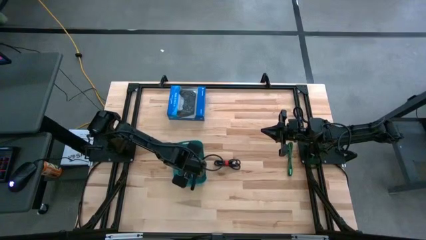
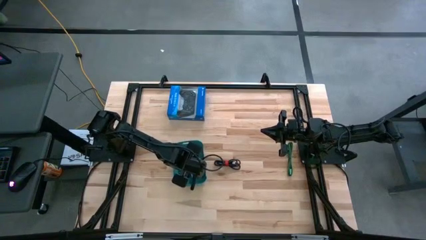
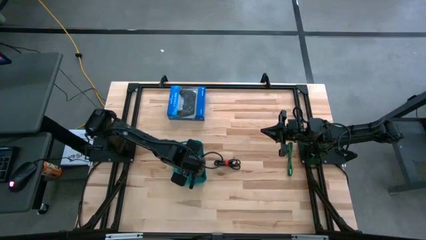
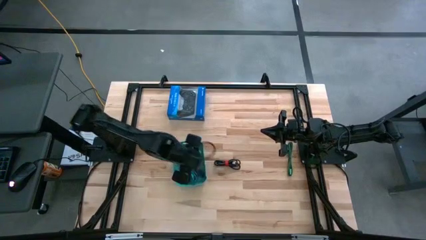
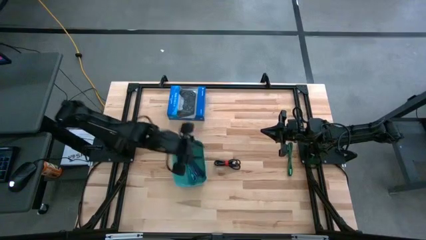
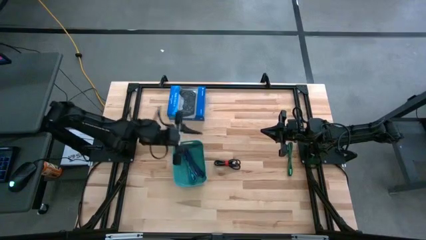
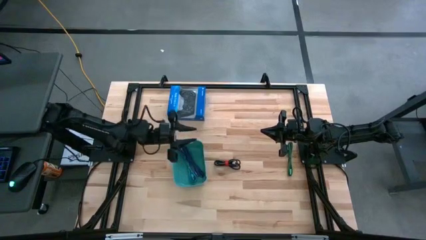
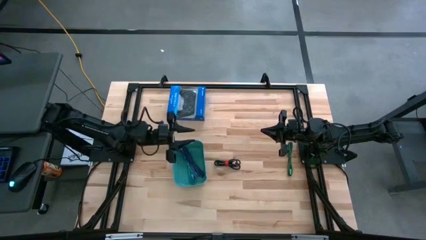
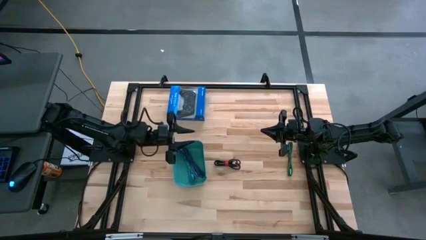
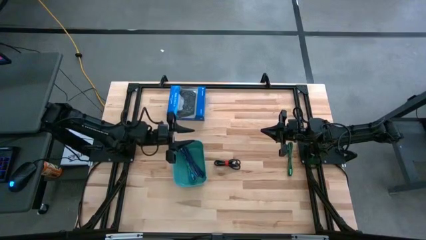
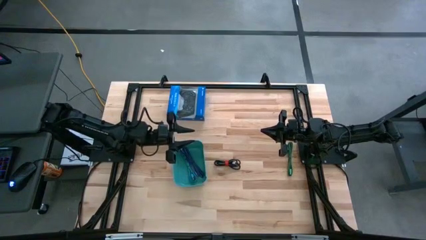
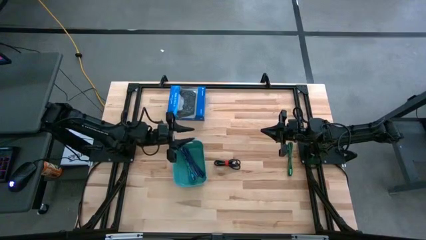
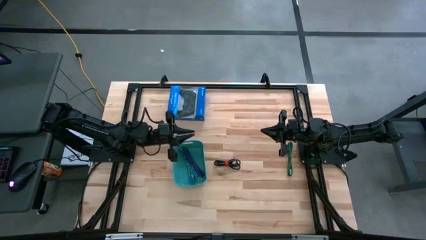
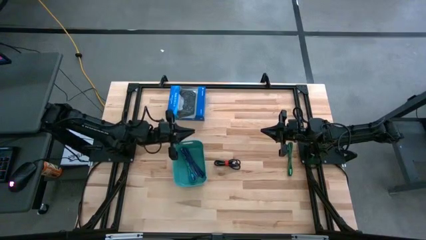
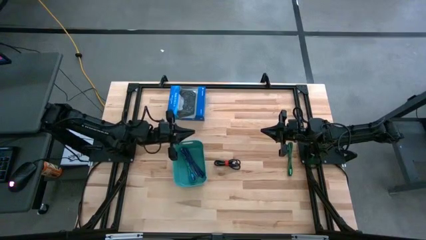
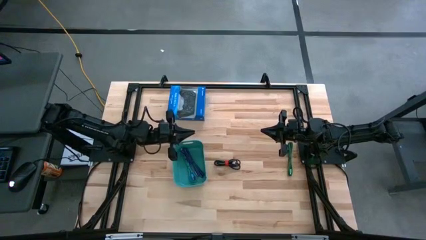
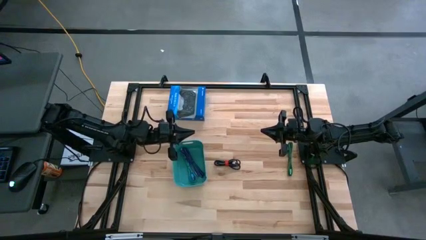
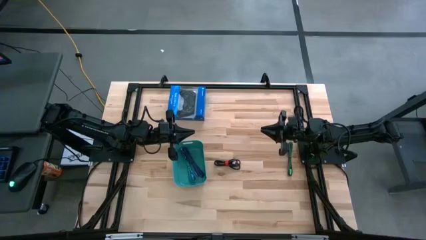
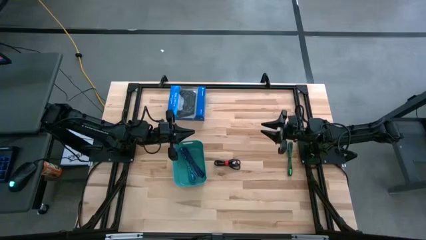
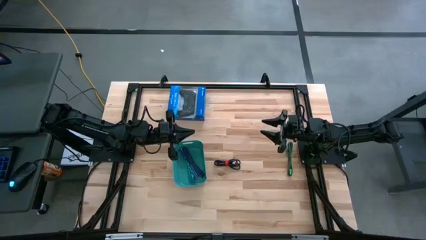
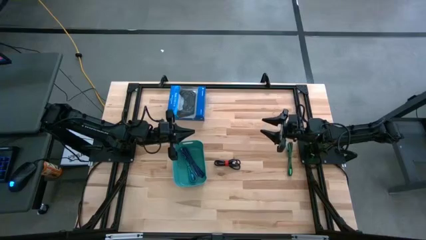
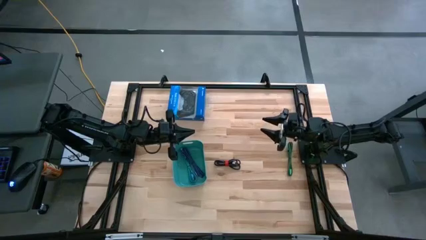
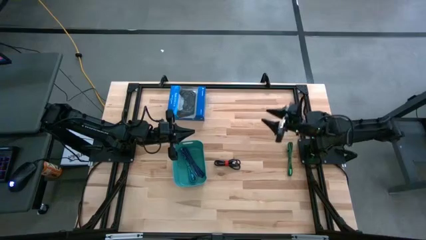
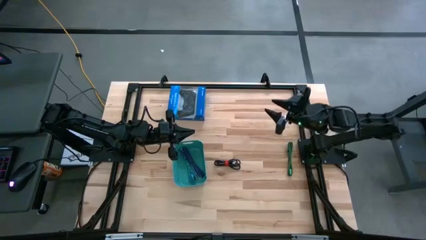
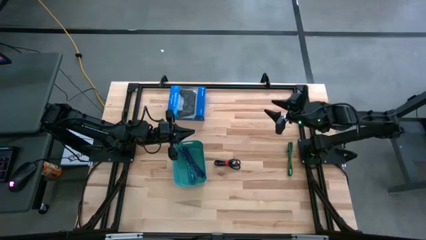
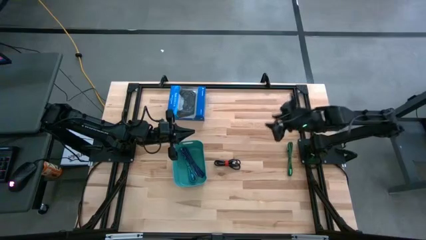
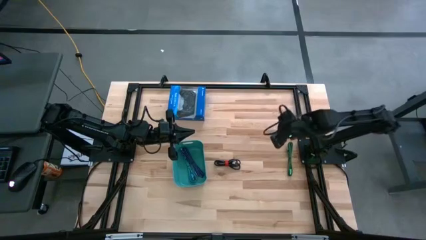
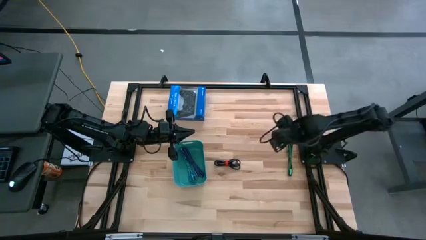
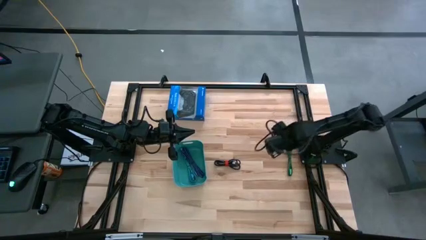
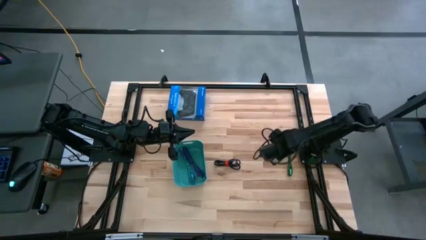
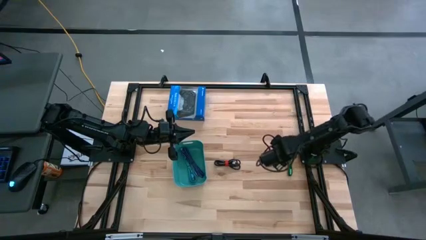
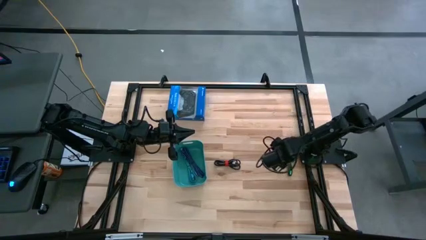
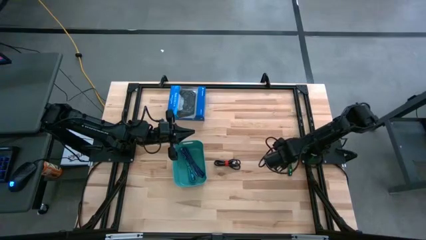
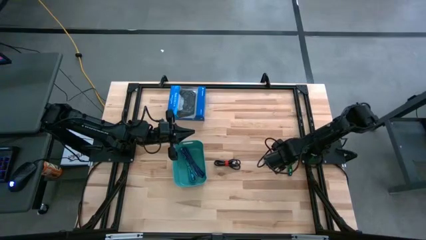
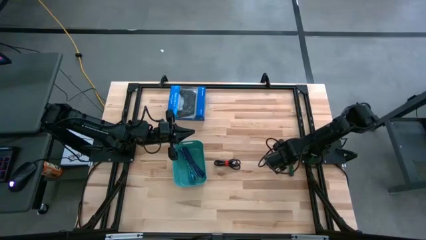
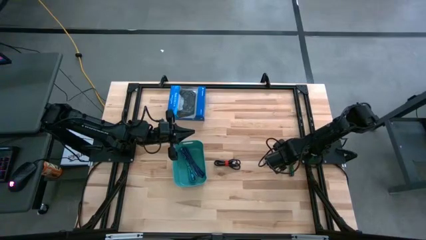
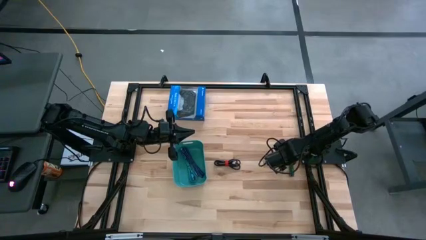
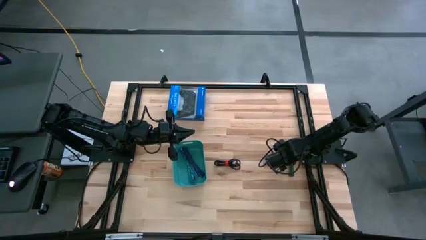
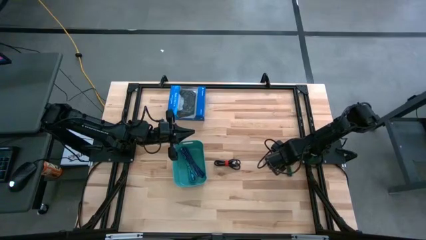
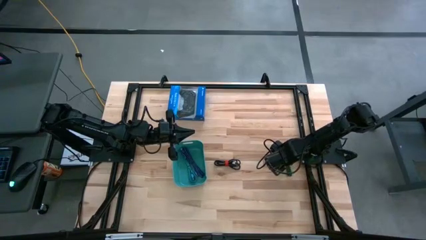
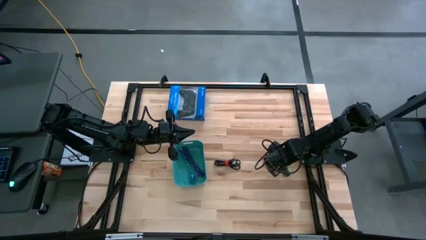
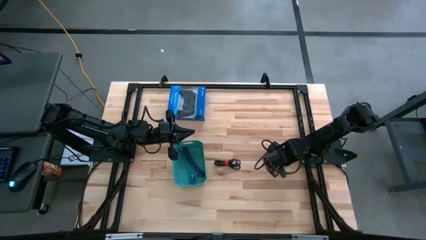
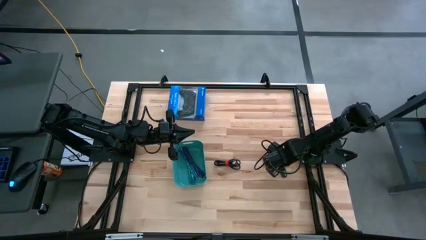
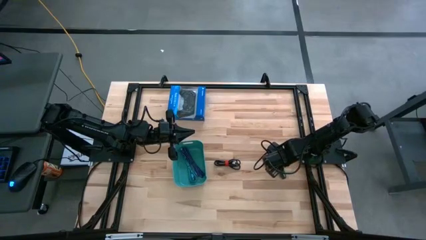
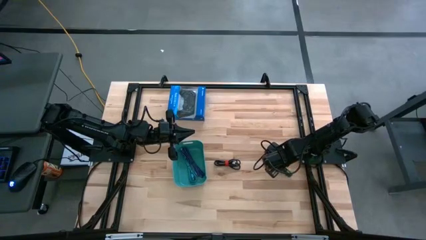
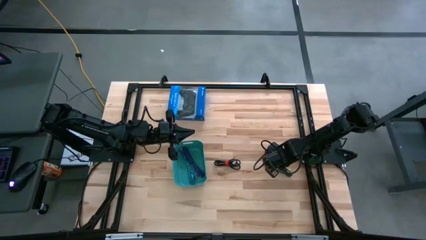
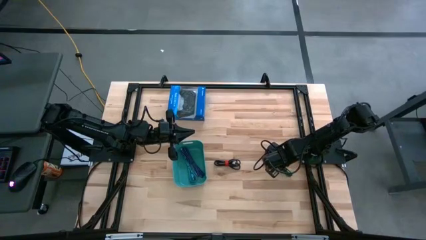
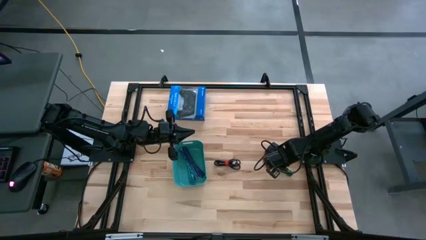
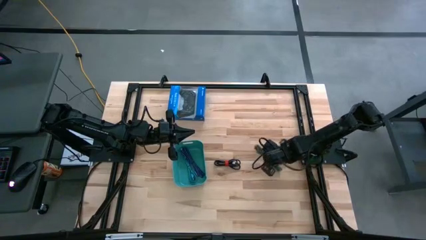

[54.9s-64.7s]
Task: Pick and place USB-C Cables
Put the green charger cable into the green bin

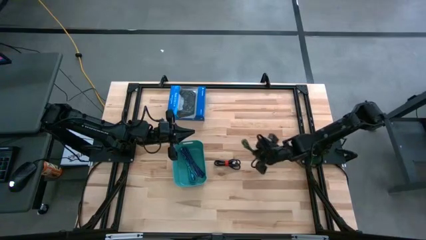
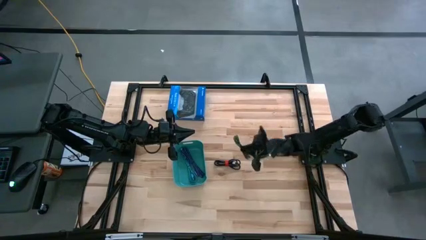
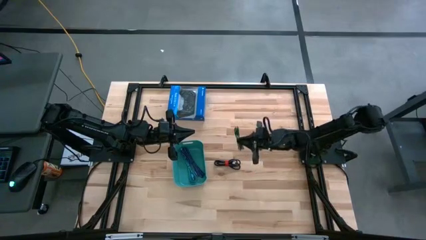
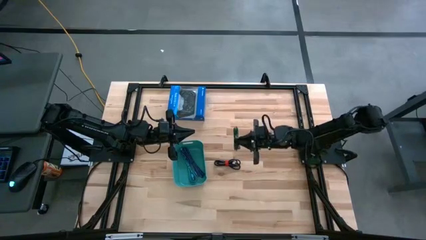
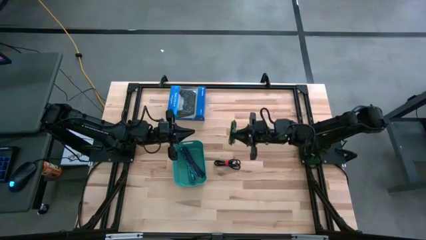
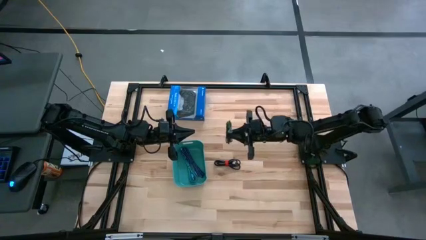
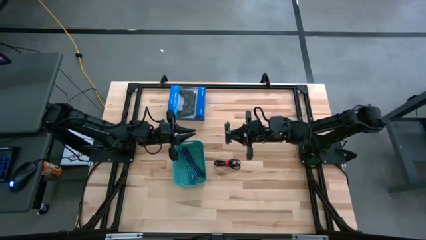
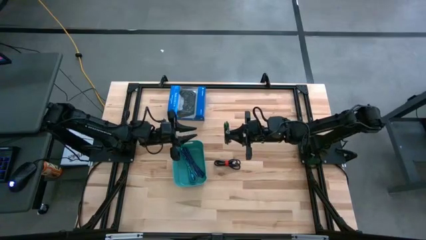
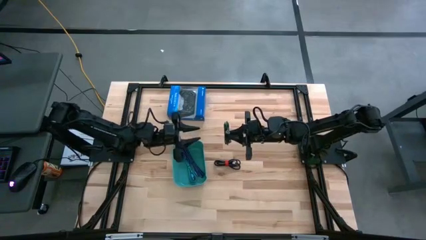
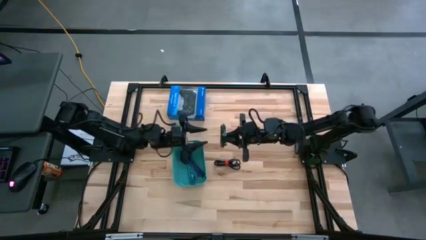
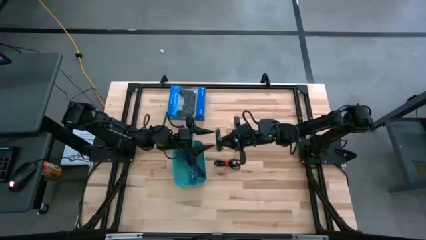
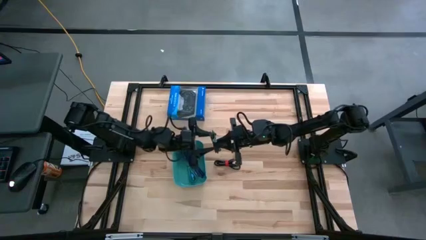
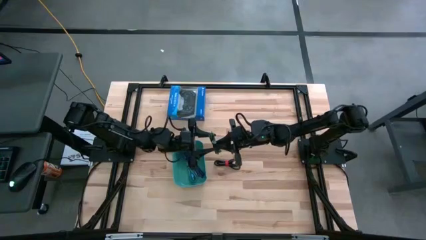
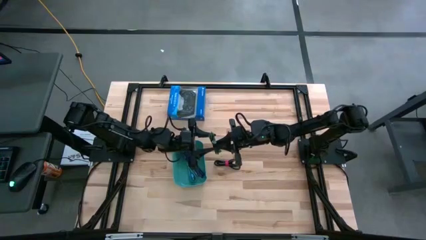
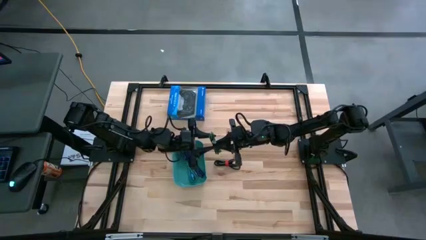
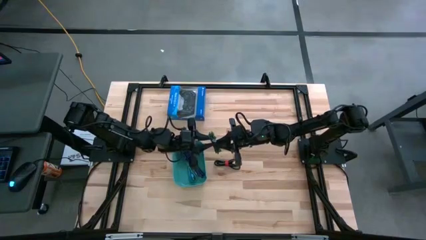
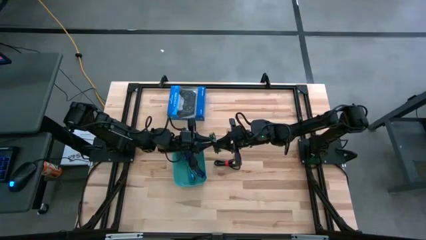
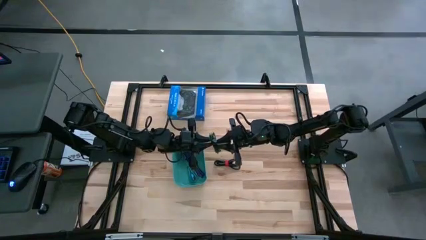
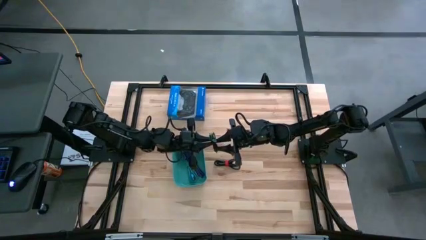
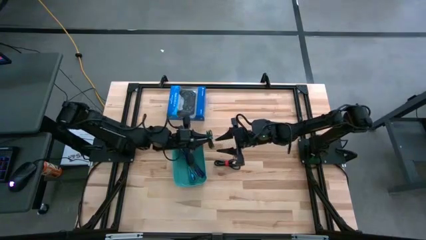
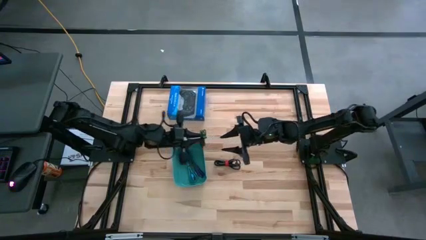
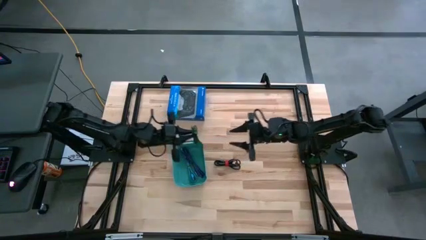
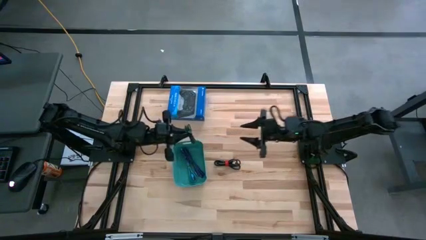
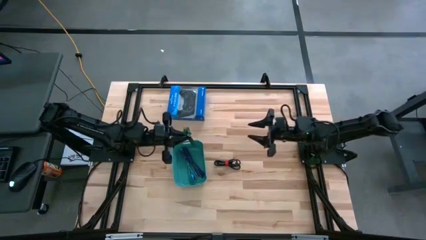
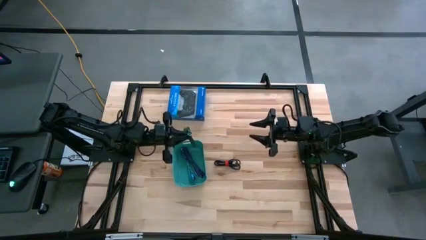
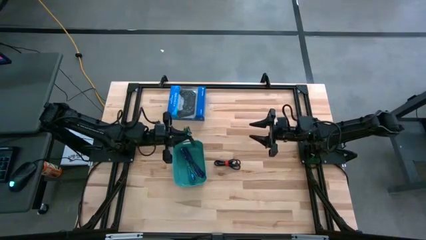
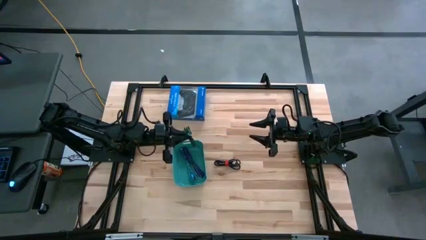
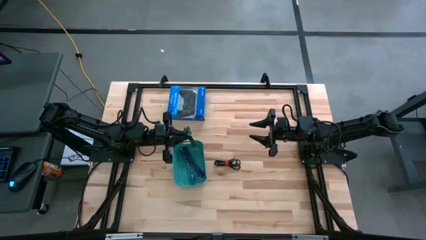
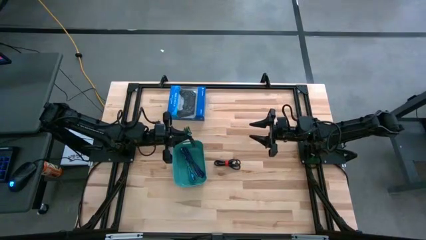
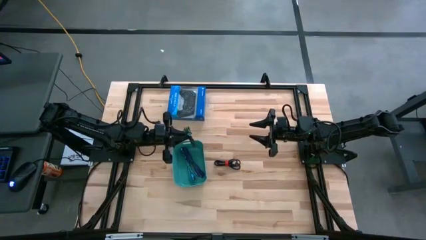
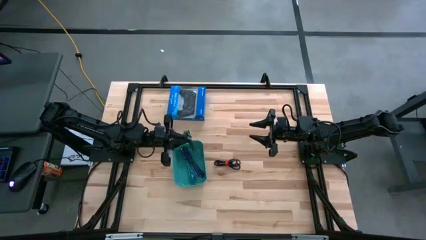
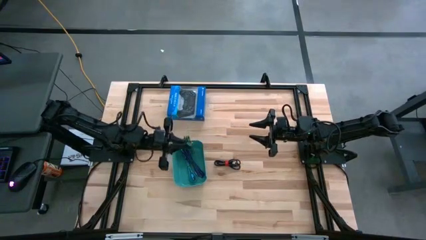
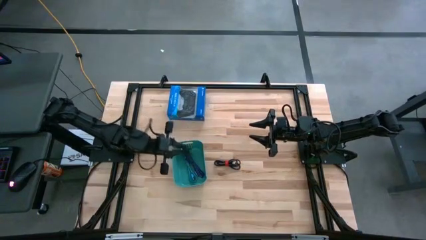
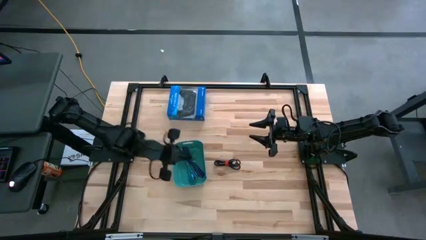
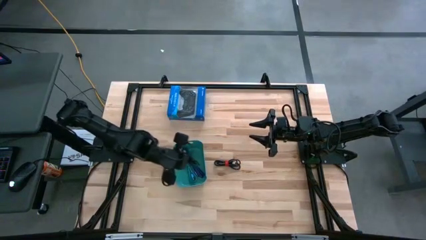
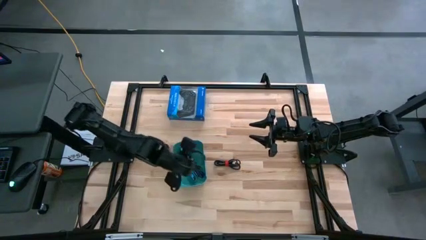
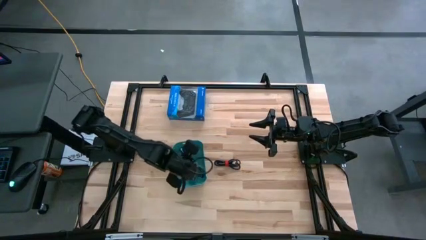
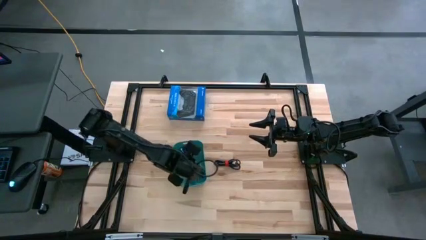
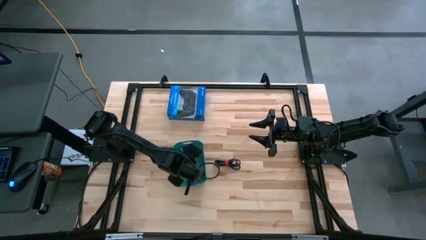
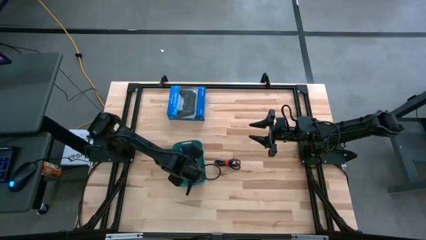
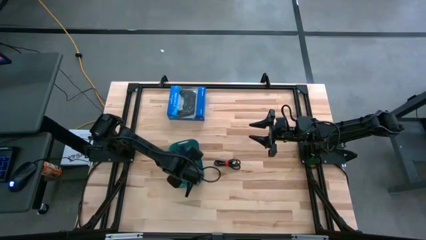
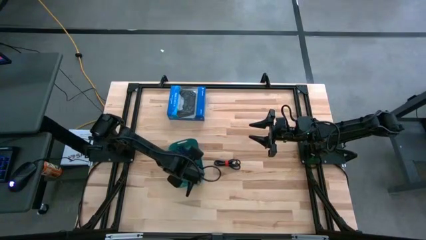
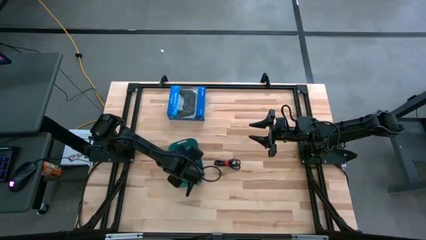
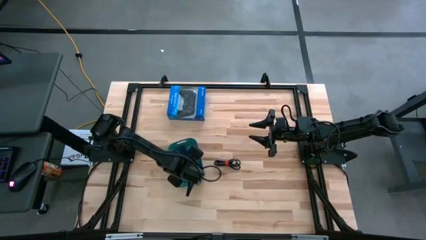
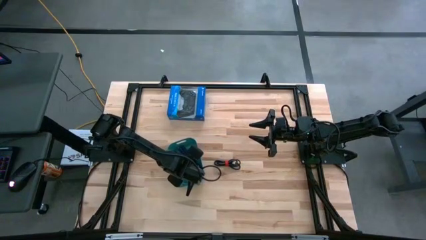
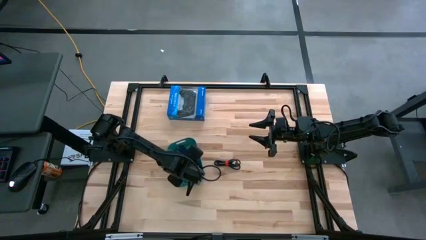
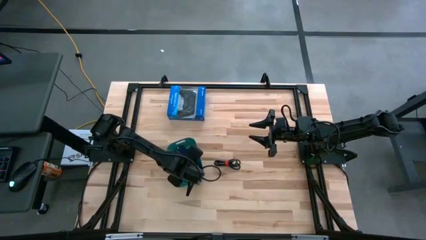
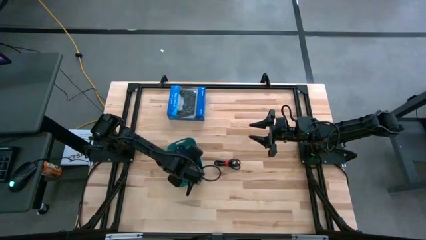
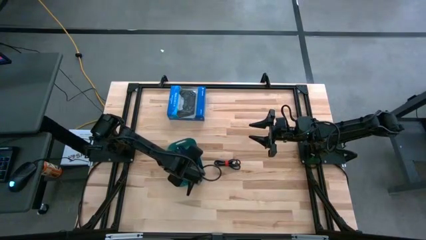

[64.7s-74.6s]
Put the green charger cable into the green bin
